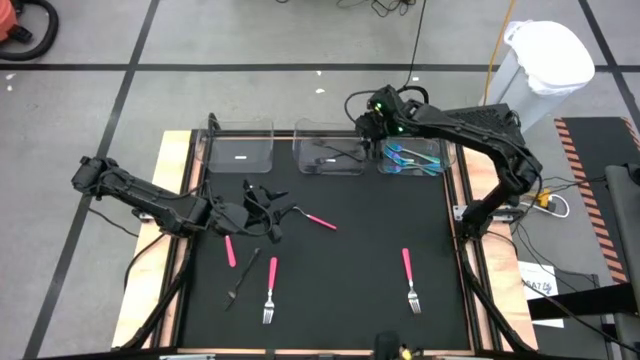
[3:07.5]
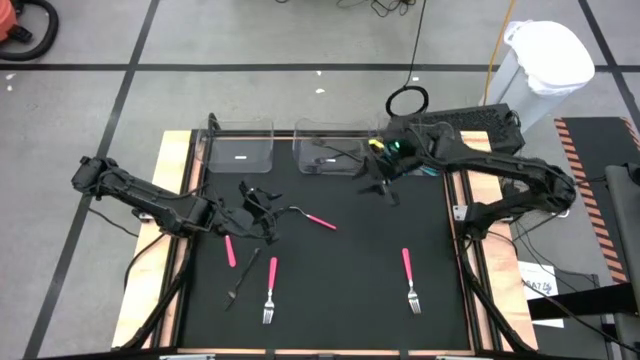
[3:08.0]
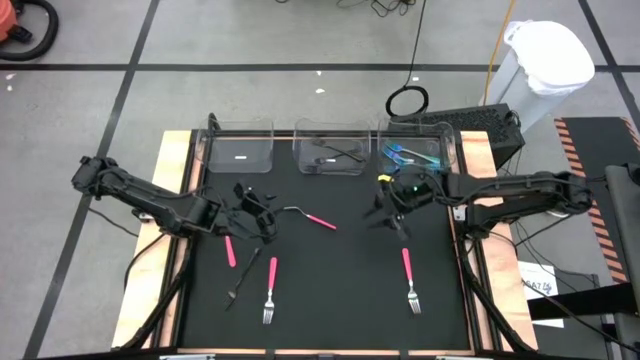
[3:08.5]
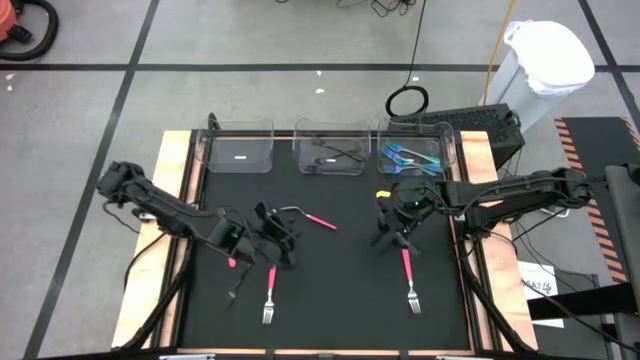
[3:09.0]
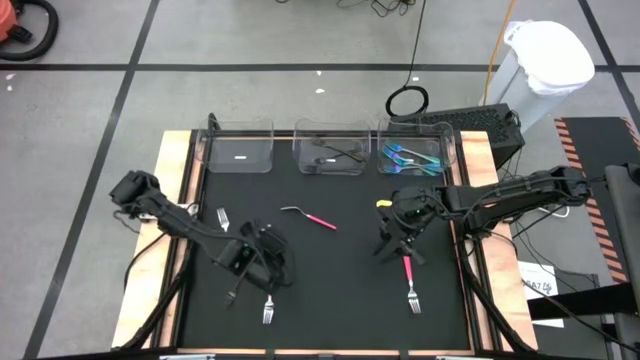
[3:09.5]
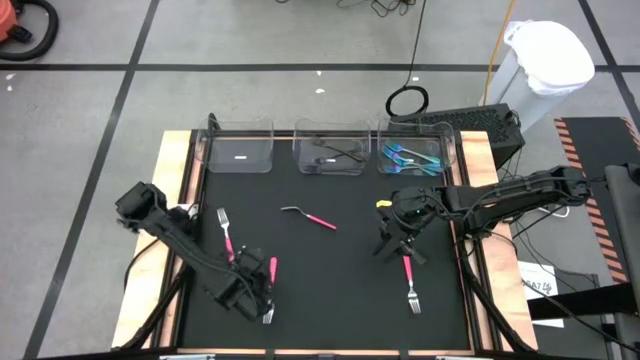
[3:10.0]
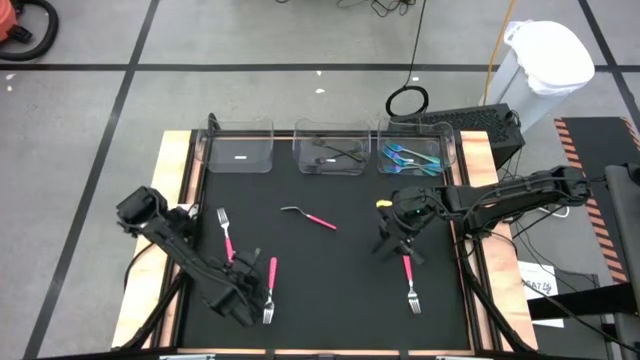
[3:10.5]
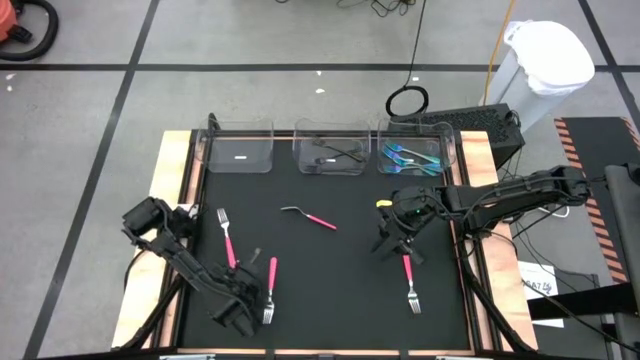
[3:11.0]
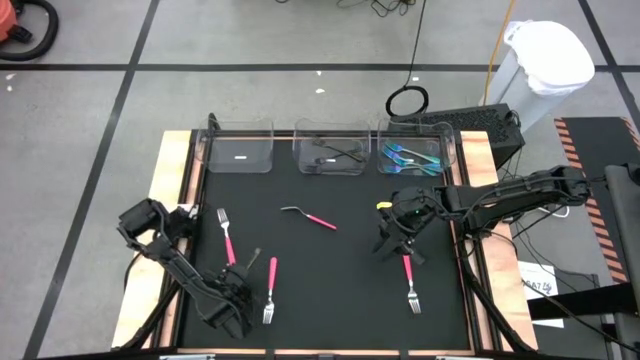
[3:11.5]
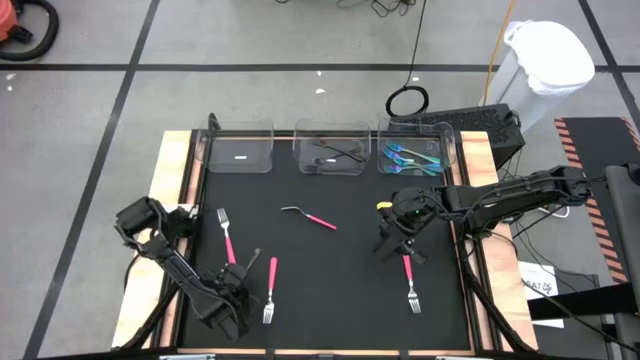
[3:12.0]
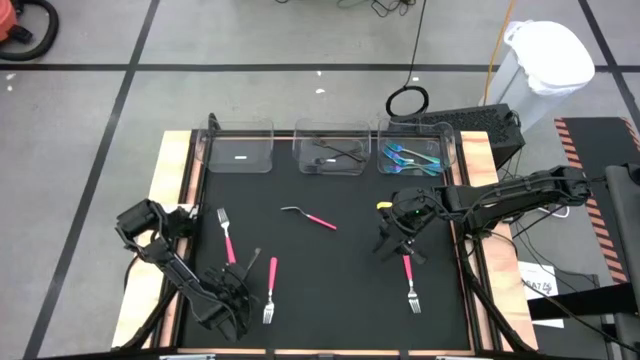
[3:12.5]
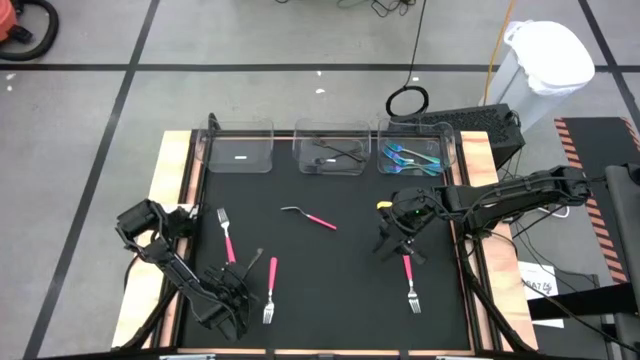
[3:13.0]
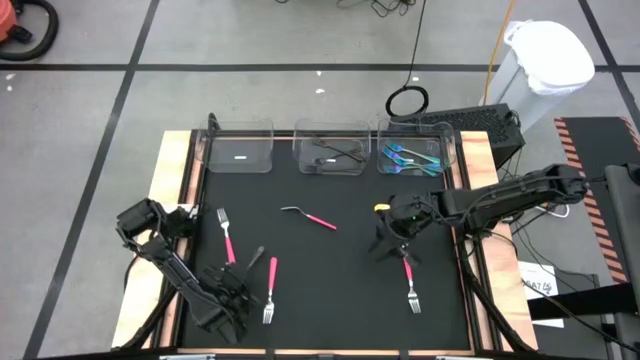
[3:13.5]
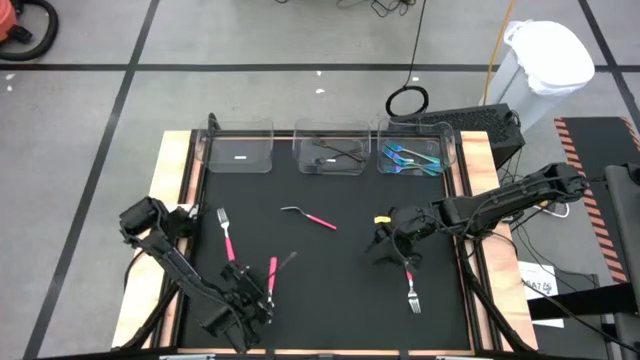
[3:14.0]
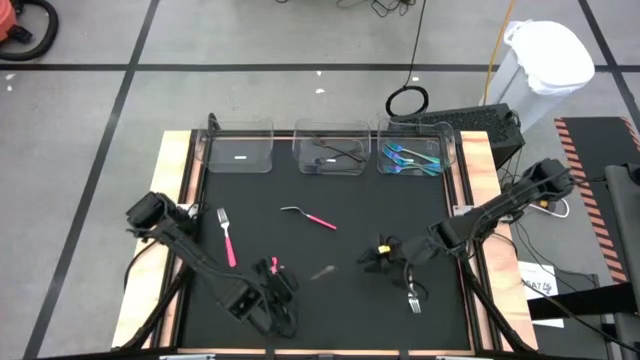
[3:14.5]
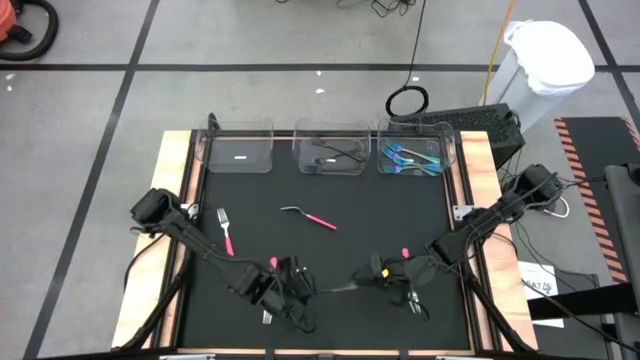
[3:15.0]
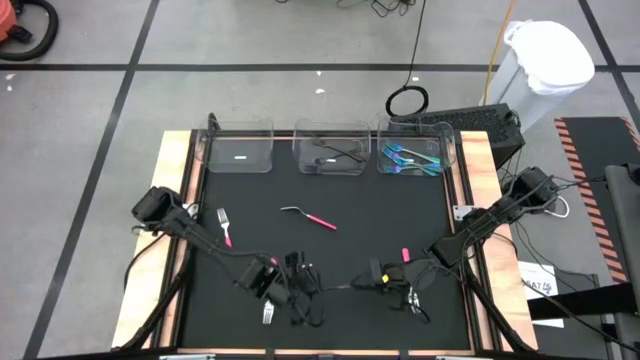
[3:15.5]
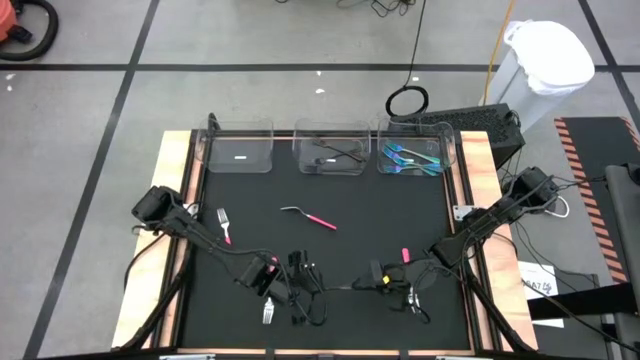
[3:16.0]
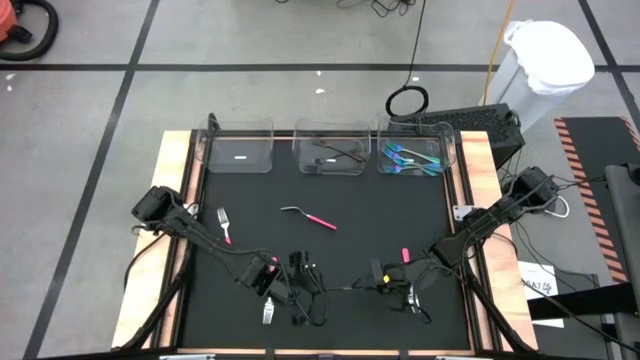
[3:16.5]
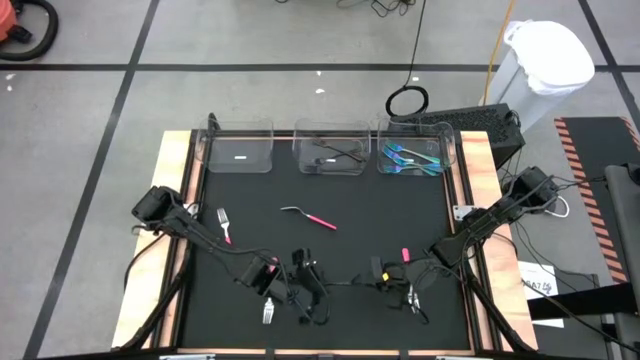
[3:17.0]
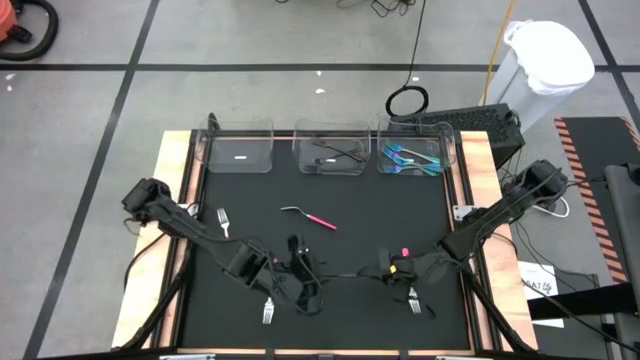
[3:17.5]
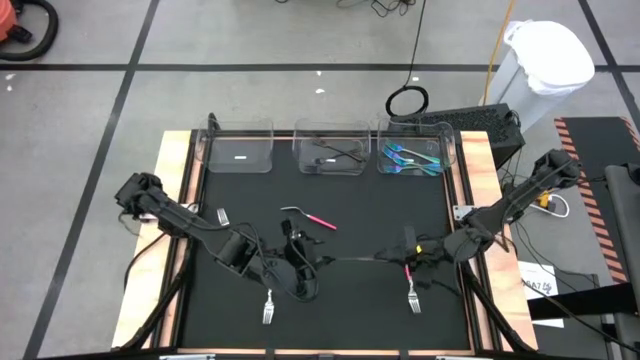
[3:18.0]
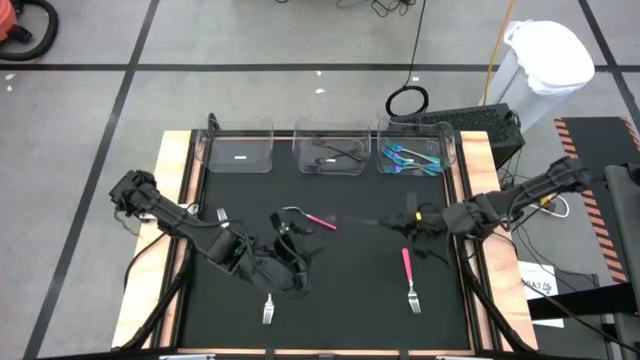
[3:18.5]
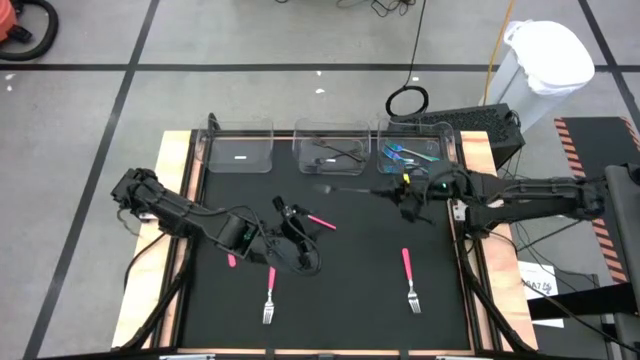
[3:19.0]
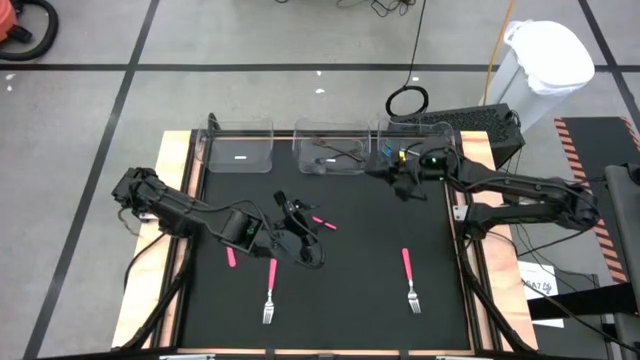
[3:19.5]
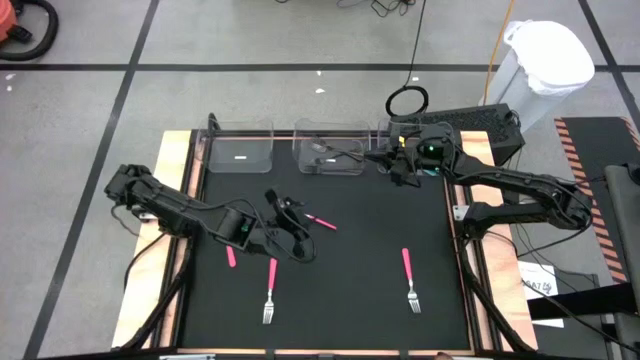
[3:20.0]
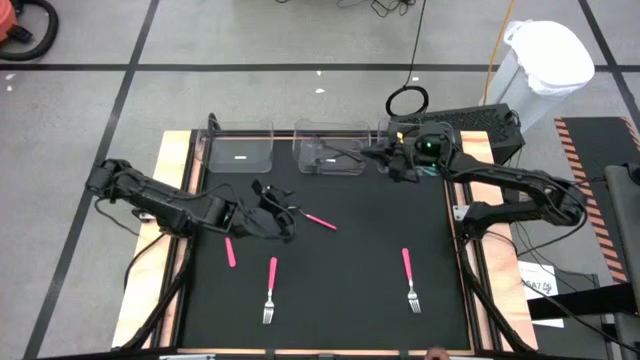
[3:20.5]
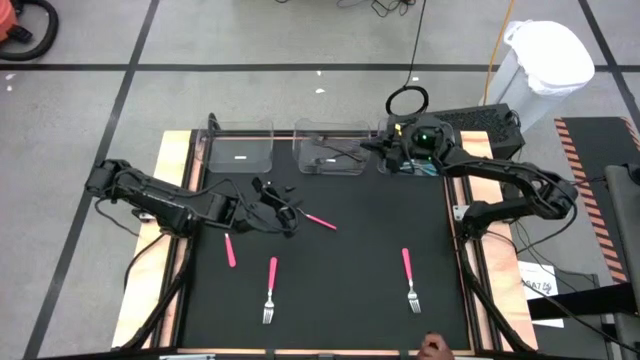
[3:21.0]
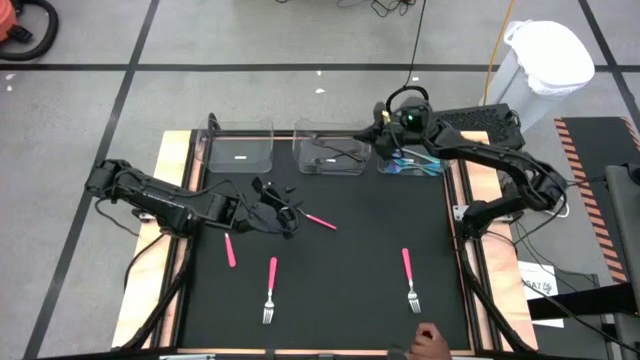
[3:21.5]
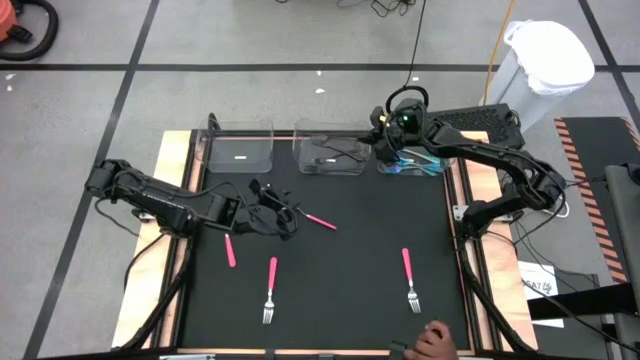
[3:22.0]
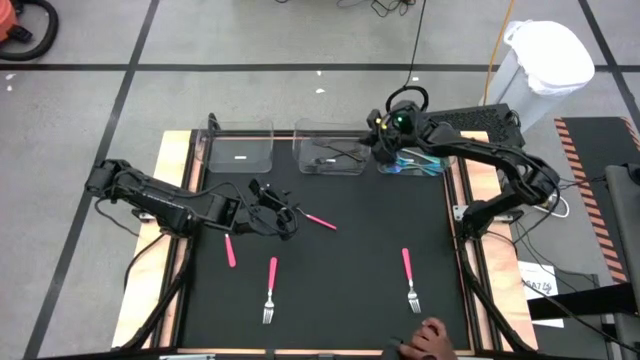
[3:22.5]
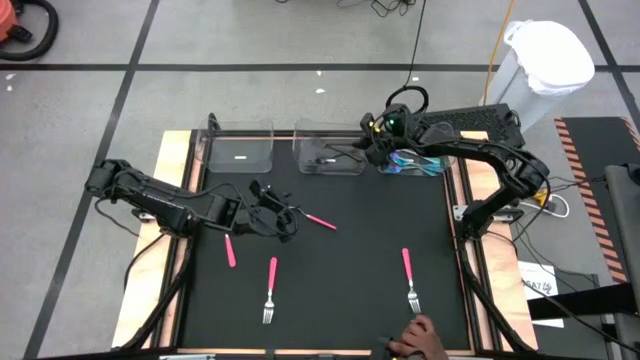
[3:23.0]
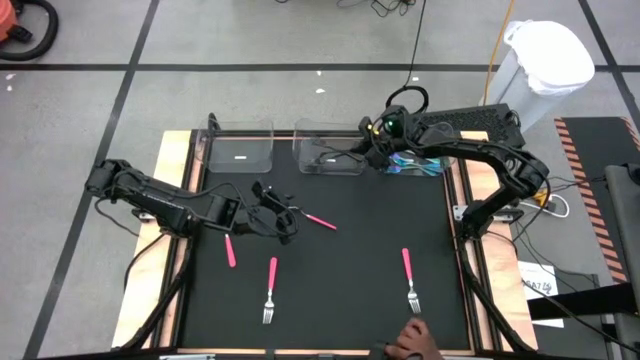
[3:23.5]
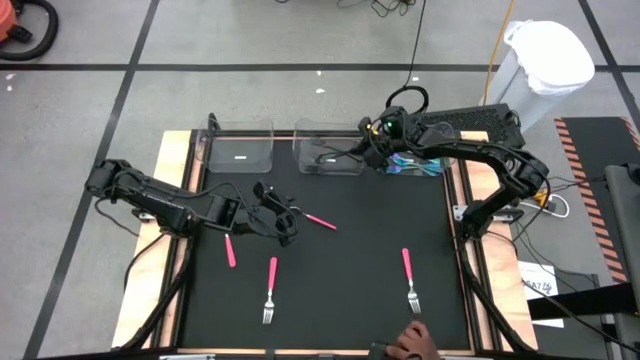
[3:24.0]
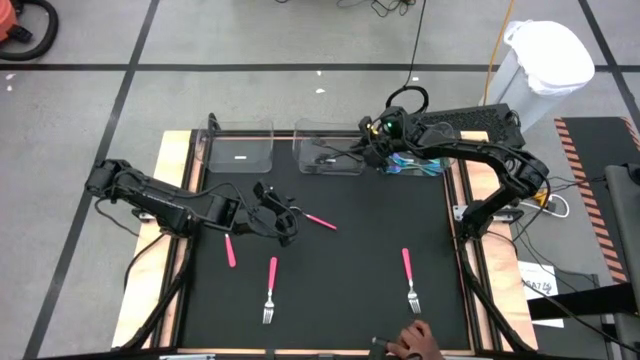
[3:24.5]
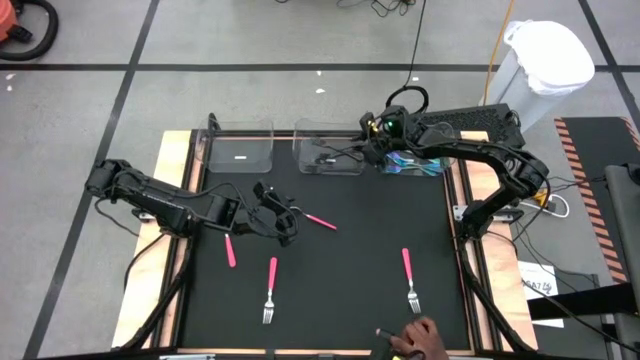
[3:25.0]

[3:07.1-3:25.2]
Task: Sort silverware by color (type)
Put the black fork into the middle transparent bin

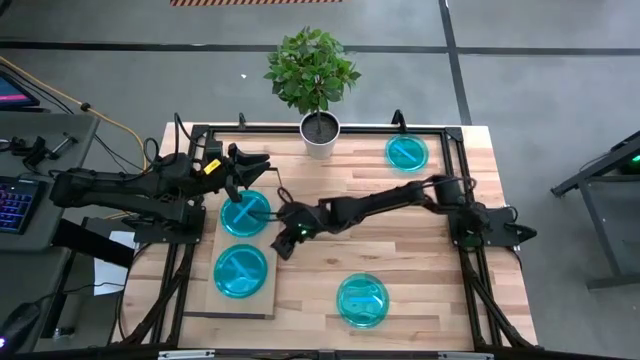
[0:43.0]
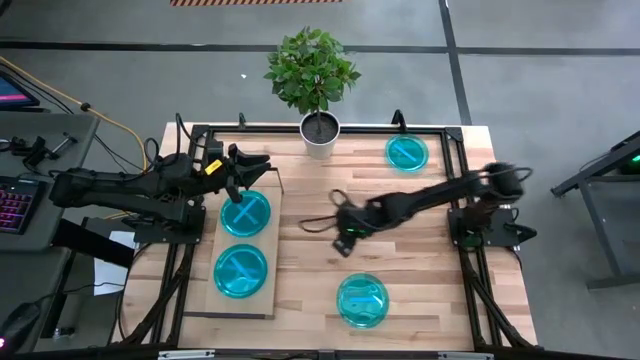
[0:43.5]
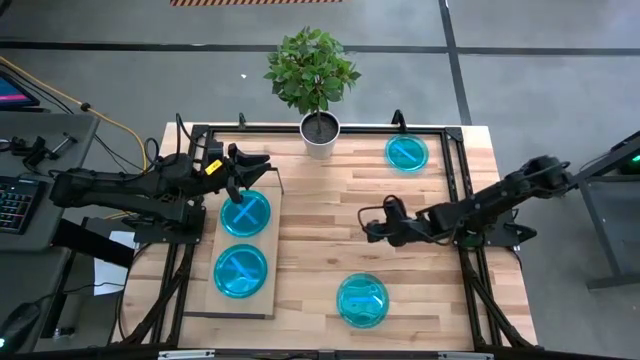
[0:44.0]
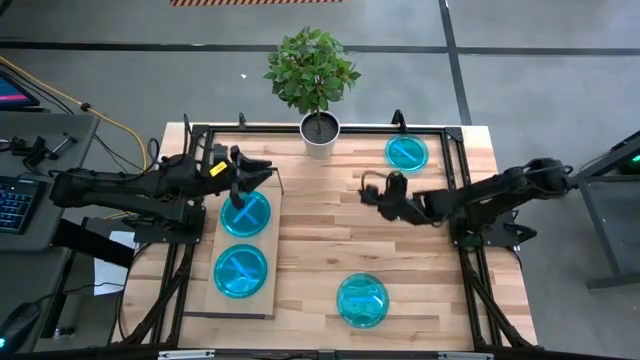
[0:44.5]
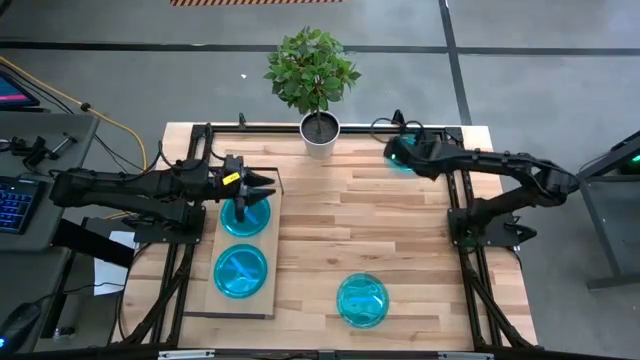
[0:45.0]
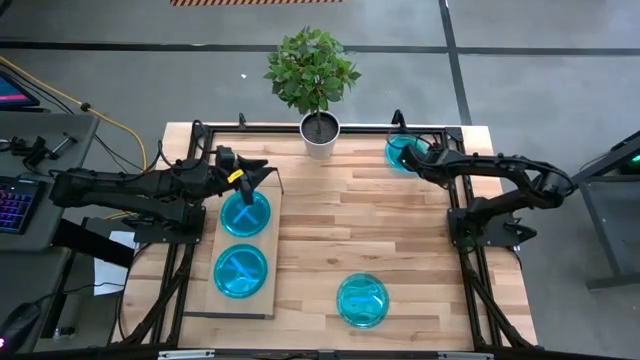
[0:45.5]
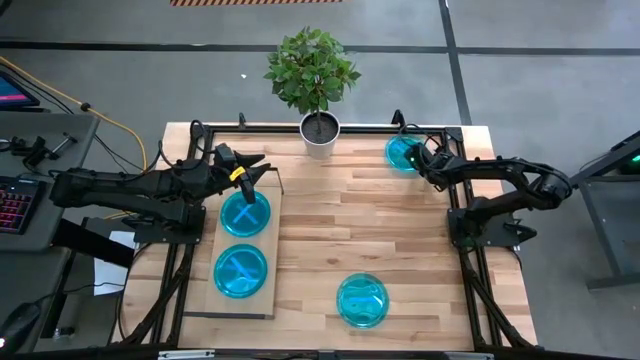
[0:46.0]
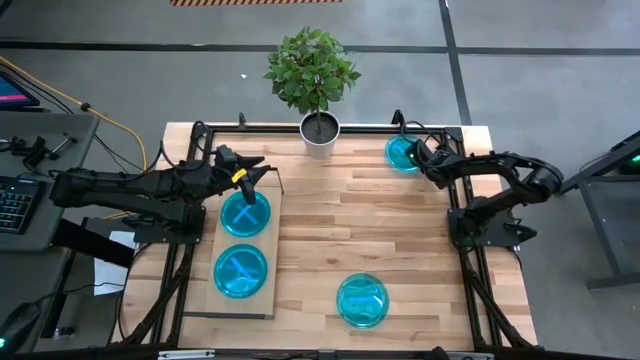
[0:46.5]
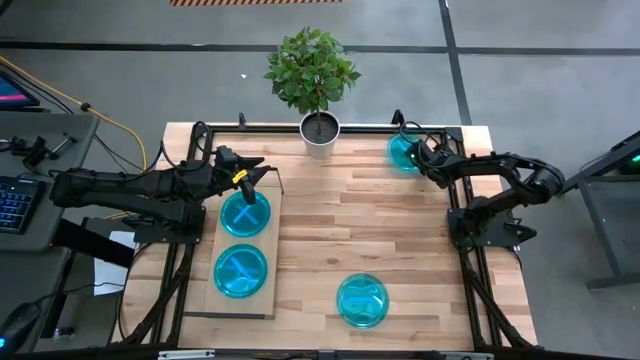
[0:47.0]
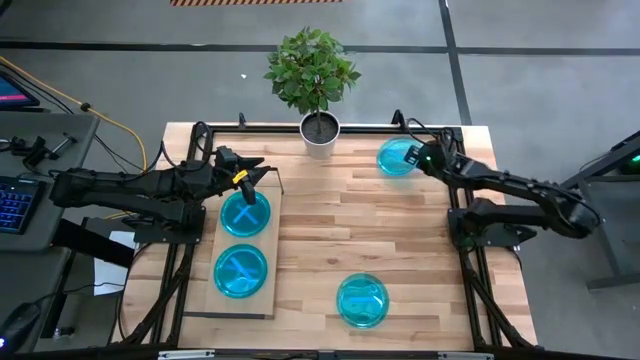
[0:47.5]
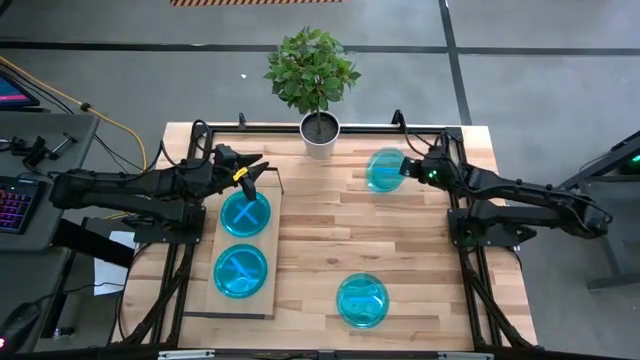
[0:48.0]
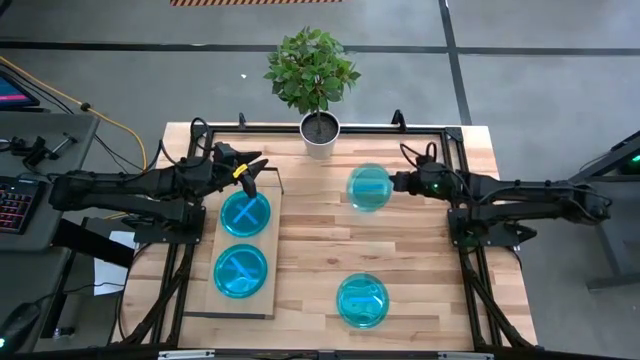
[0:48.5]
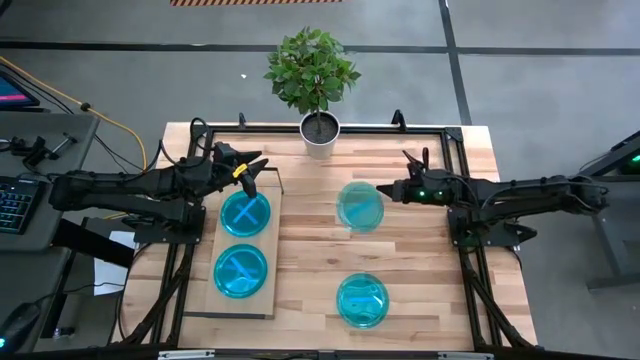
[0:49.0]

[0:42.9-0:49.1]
Task: Place and stack plates onto a shelf
Stack the top blue plate on the bottom blue plate on the shelf
